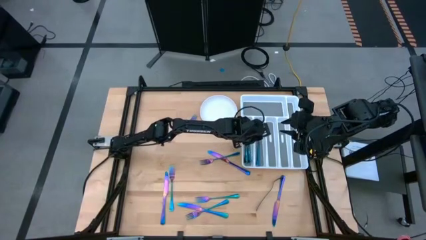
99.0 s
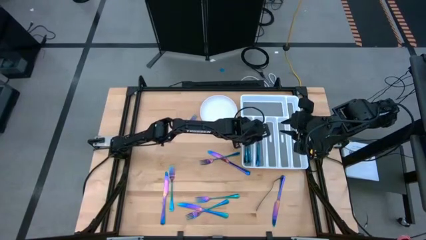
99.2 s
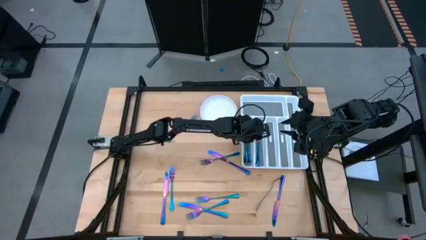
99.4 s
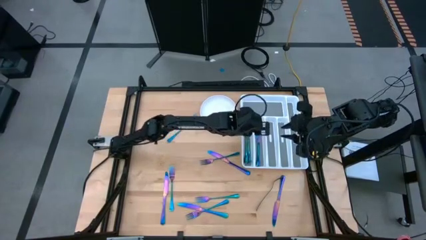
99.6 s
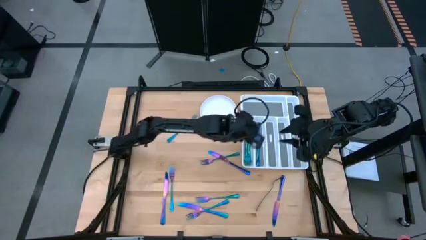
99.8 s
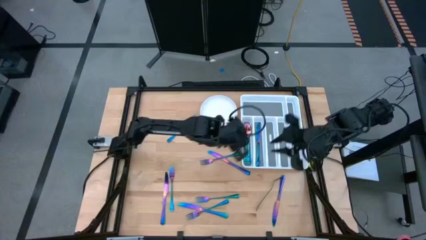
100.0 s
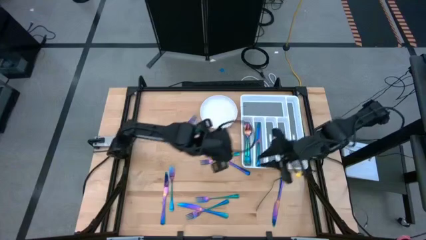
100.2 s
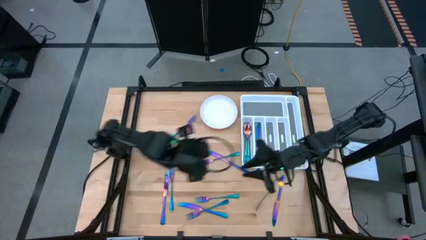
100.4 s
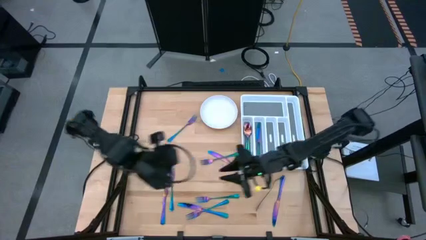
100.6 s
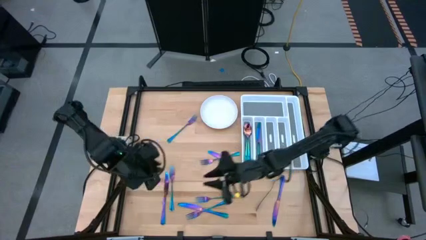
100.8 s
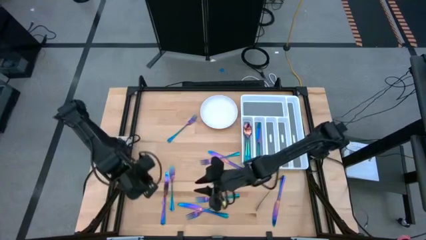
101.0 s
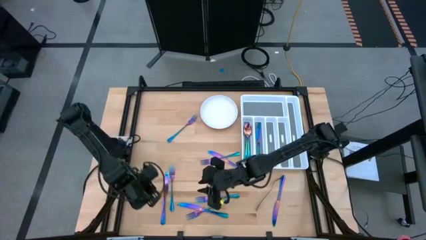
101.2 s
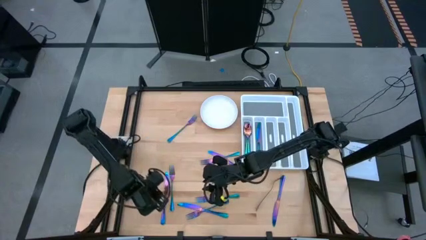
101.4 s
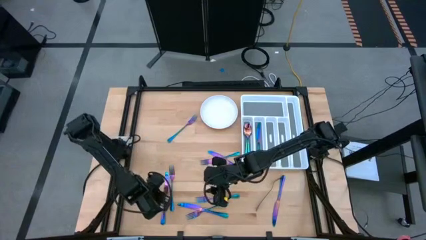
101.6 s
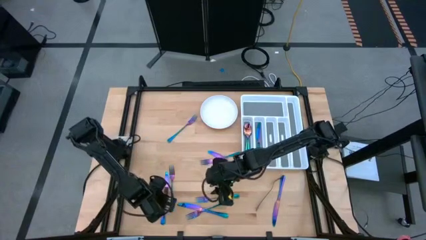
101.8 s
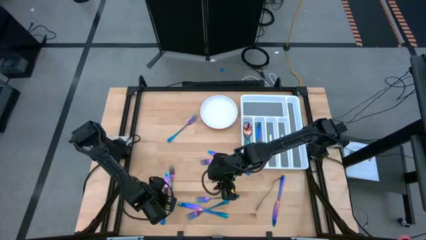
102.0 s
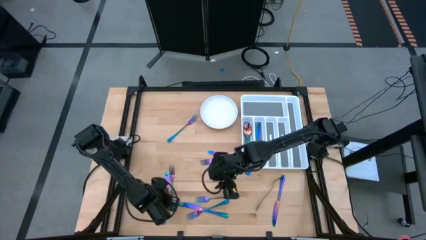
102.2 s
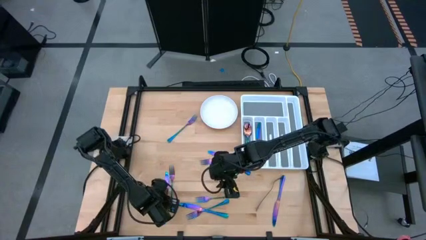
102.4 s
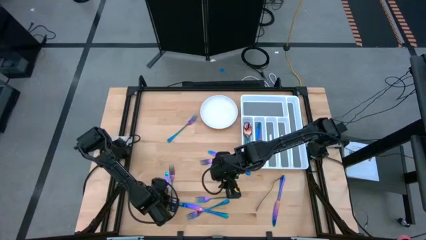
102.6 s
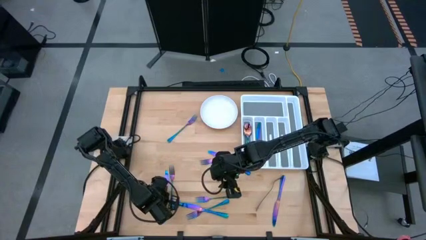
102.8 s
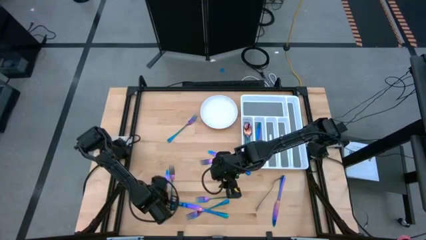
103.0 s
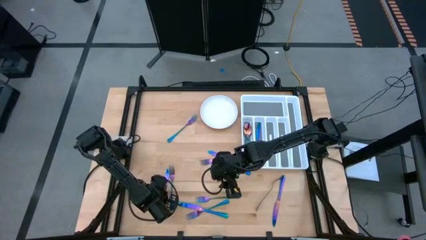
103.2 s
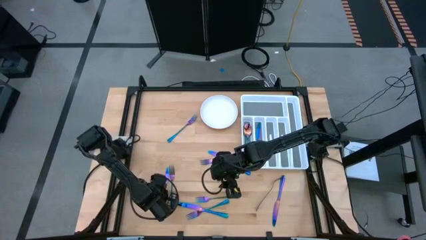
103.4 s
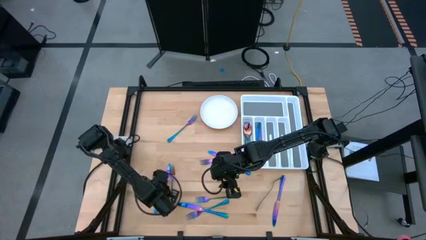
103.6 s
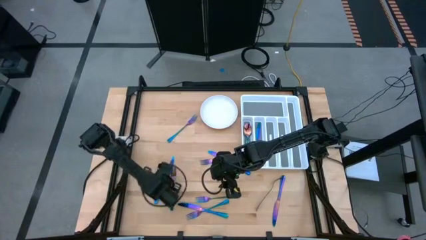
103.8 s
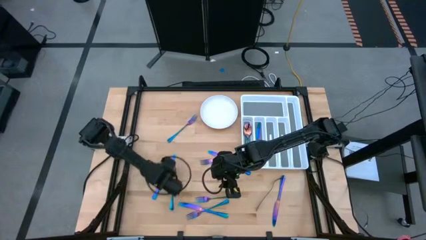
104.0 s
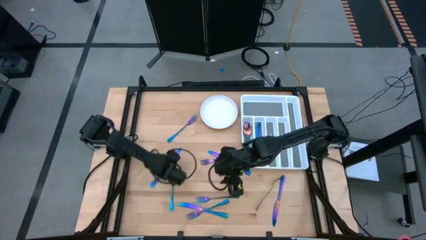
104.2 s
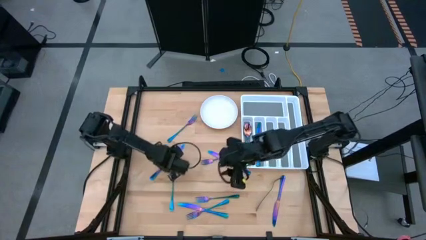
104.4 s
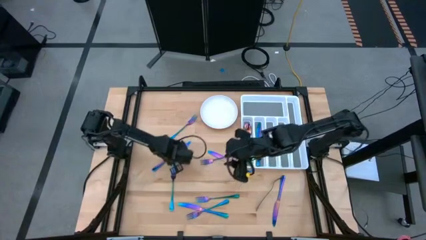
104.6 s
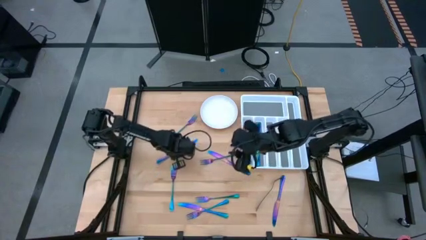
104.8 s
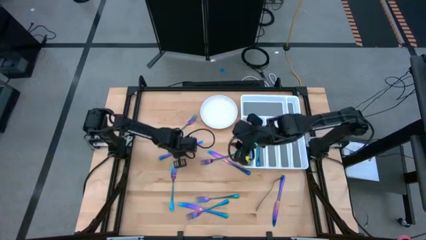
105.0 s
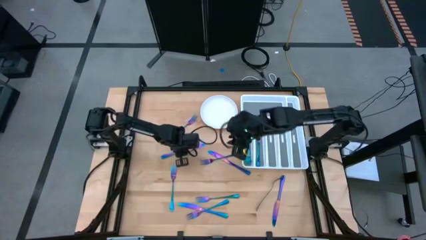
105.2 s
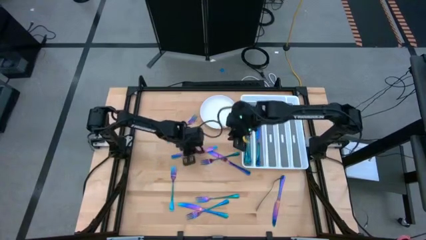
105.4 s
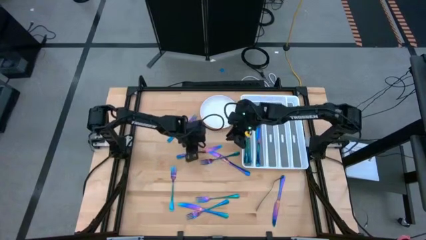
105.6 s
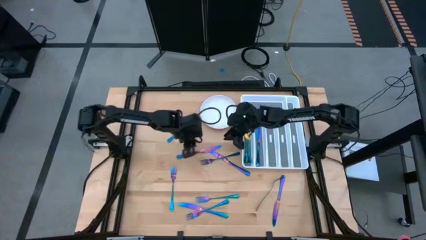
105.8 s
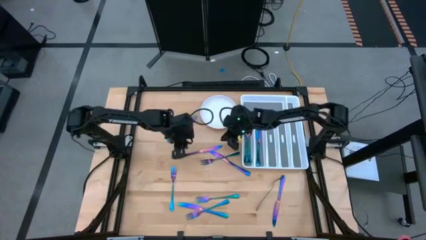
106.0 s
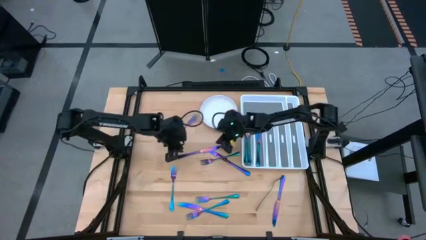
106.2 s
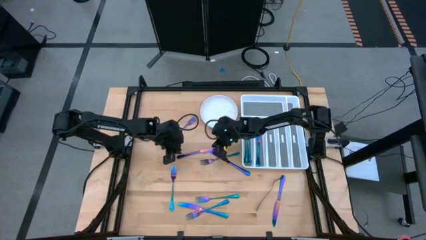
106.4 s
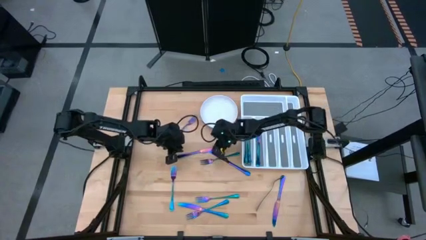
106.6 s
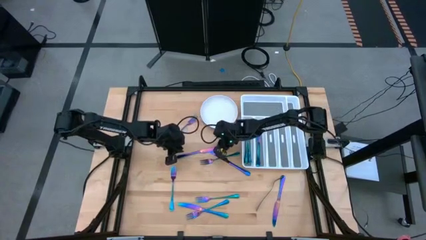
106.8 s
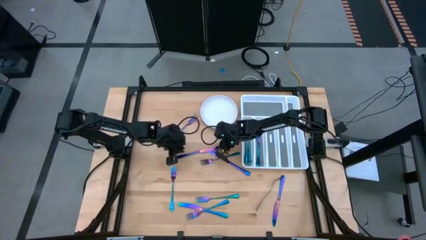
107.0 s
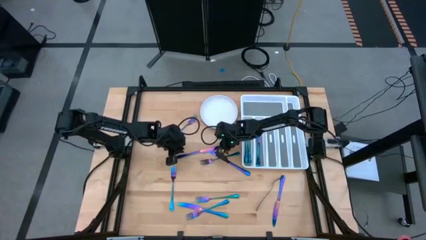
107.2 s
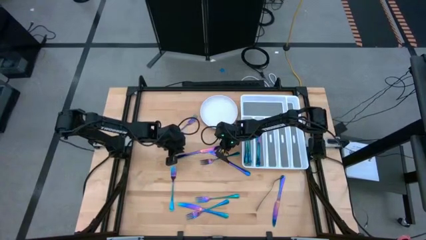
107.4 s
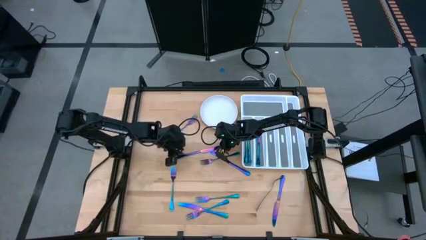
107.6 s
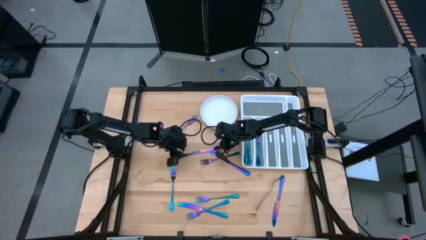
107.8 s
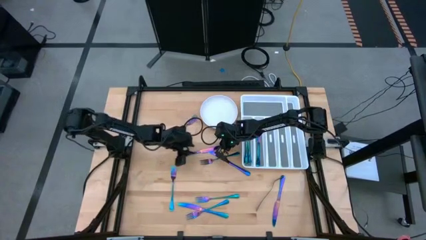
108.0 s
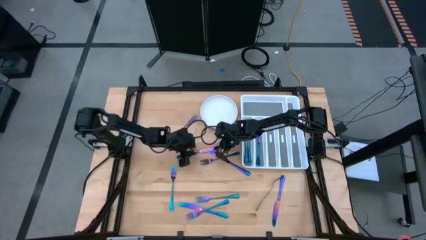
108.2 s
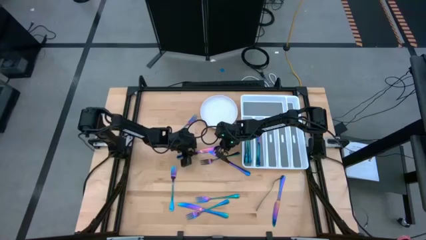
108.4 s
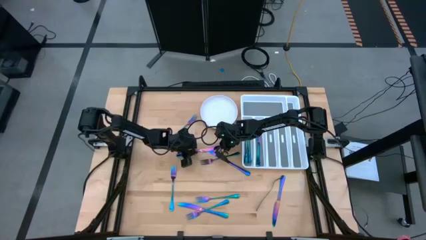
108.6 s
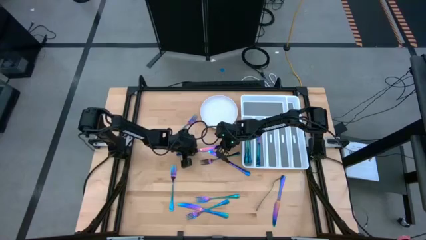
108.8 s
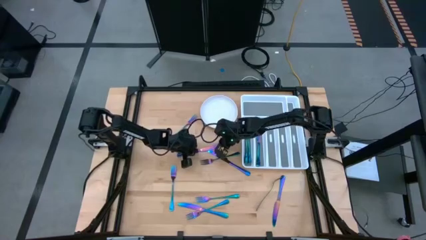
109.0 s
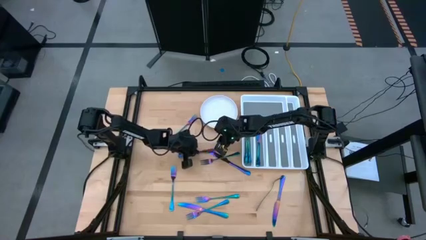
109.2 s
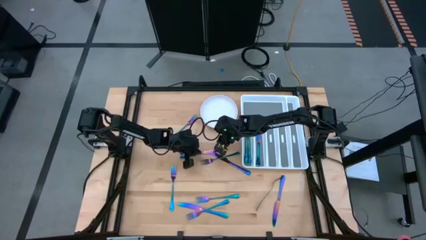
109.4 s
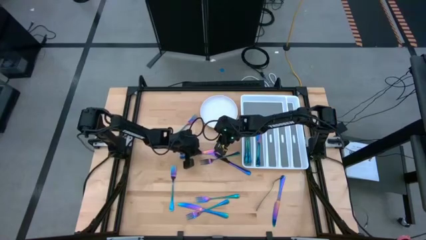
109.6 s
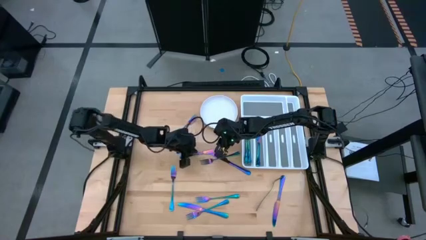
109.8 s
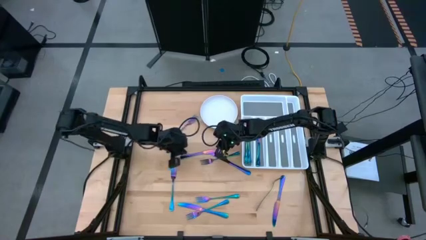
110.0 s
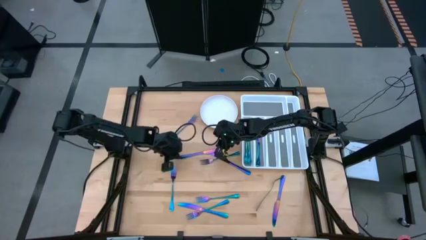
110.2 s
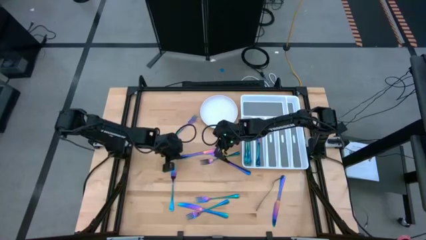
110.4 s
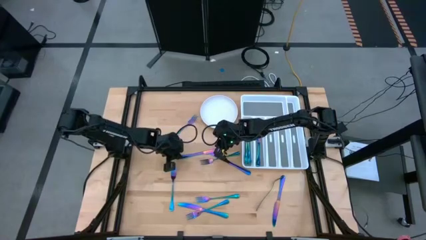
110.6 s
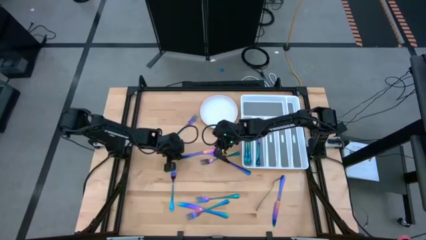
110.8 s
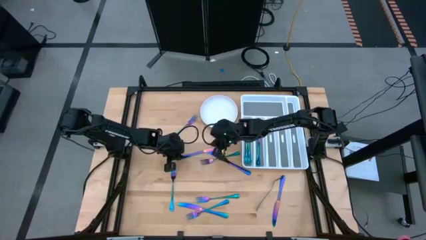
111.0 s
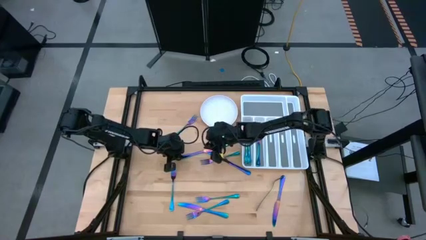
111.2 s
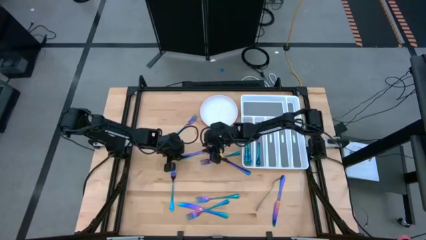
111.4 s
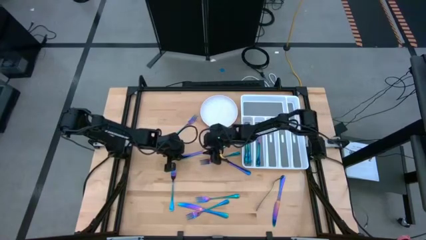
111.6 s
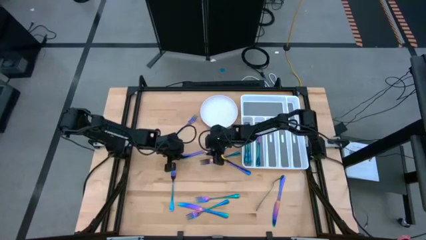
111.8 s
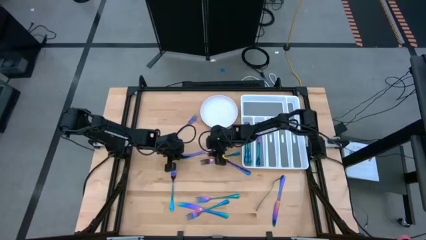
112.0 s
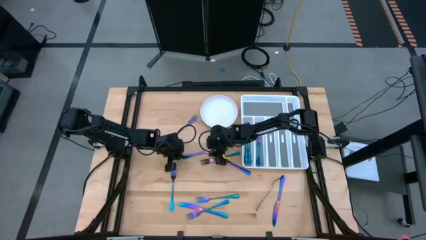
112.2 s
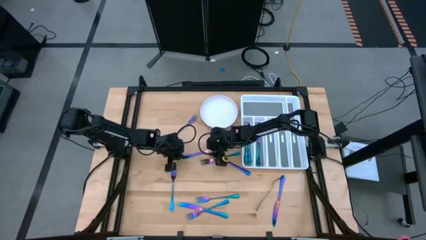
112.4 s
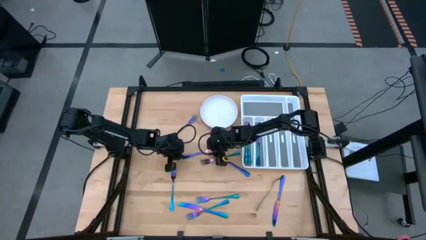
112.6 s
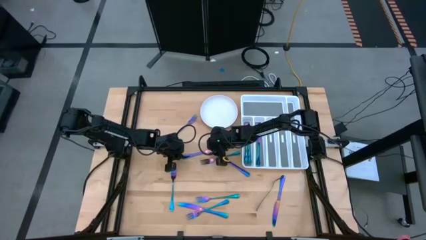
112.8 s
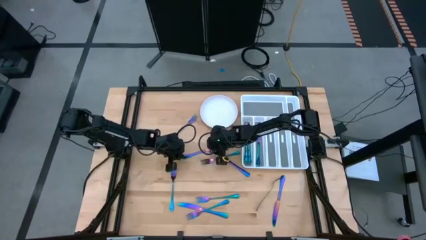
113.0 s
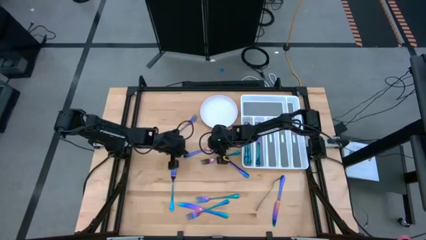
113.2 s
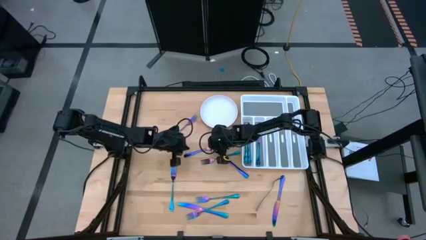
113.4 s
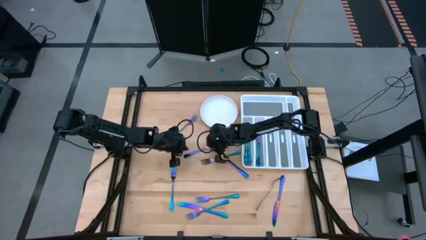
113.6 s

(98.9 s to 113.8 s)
Task: Sort silverware
Put the purple knife into the white silverware tray

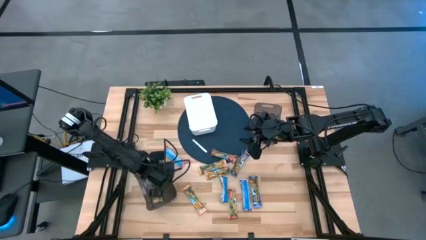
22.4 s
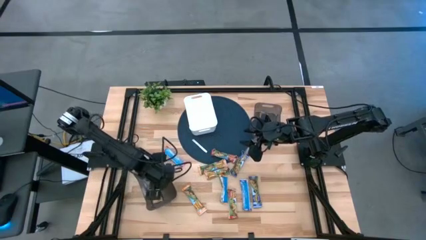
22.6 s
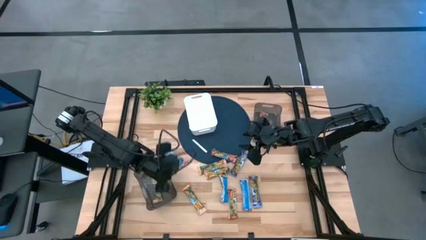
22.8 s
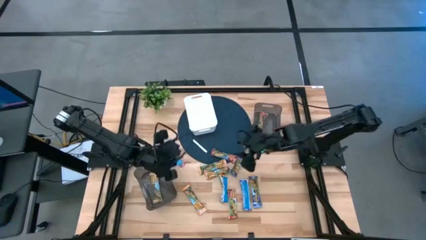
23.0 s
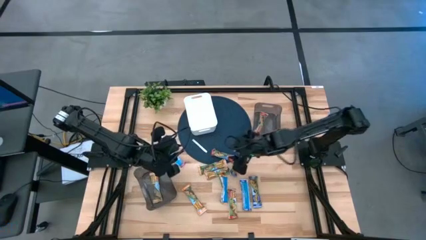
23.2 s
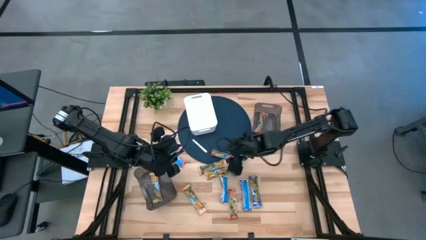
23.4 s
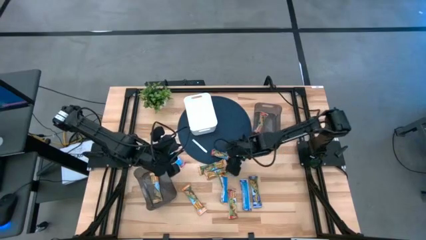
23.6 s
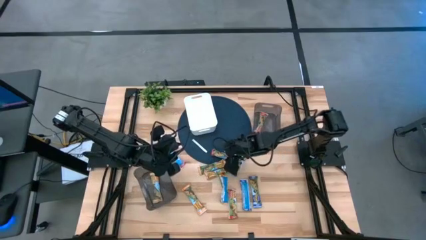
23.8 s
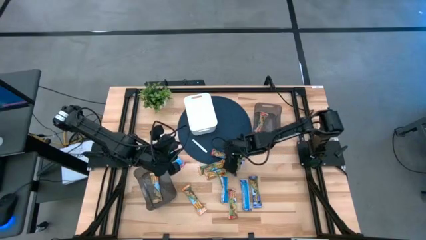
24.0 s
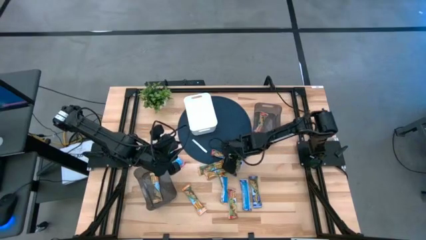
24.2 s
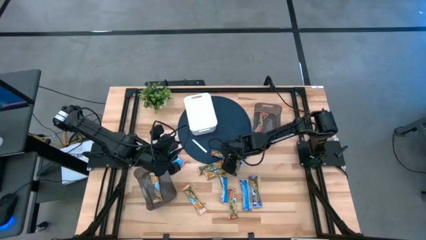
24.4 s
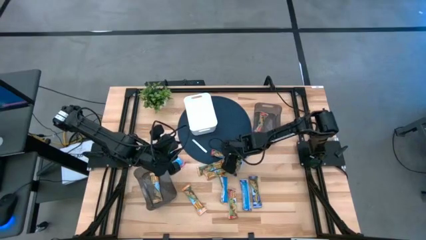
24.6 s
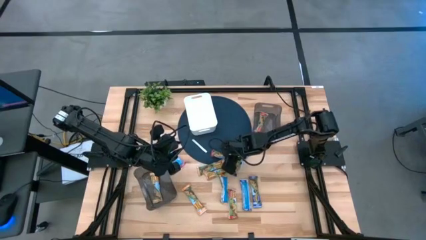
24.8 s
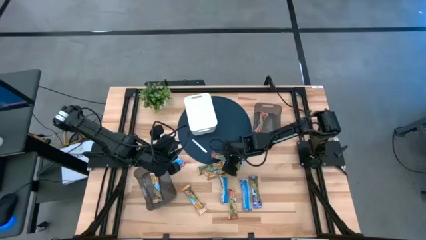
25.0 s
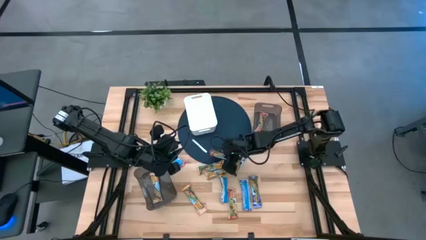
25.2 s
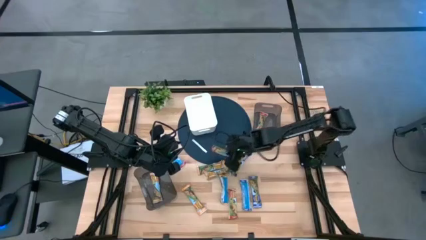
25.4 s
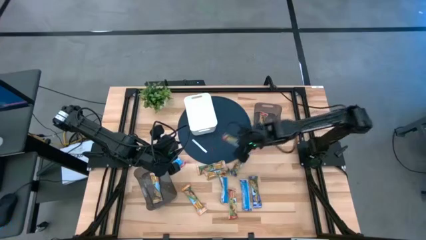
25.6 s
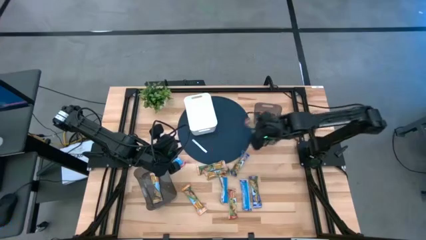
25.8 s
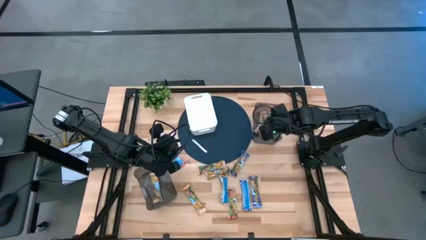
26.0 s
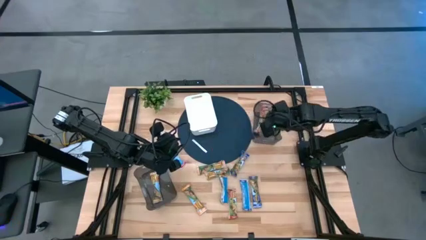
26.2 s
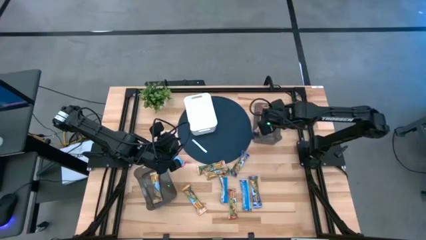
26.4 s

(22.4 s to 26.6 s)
Task: Pick and place Granola Bars by type
Put the top right red granola bar into the top black bin
